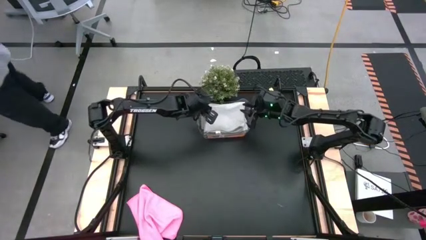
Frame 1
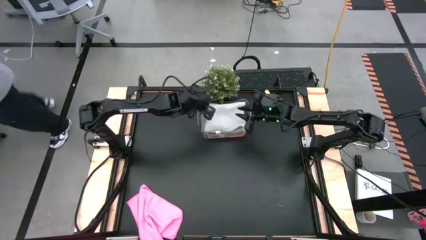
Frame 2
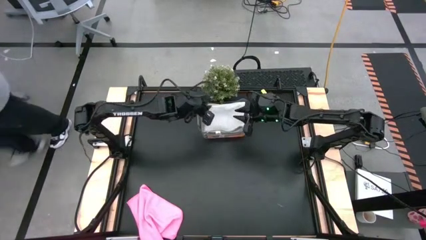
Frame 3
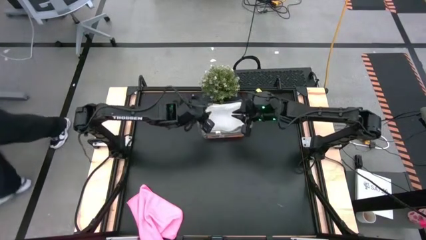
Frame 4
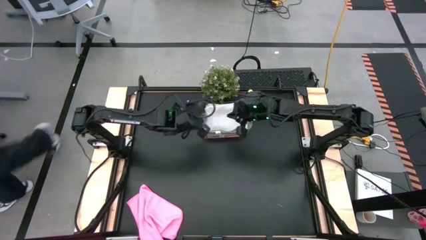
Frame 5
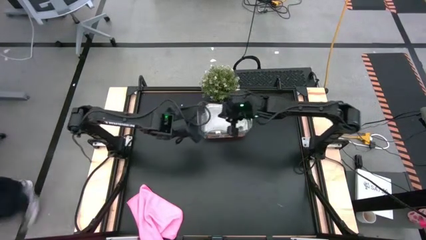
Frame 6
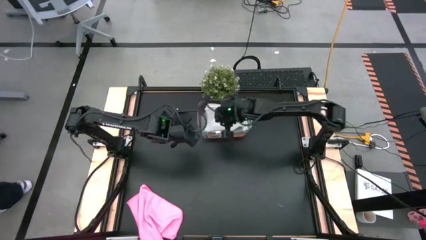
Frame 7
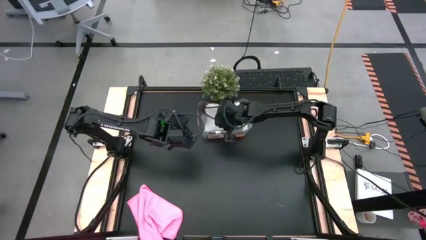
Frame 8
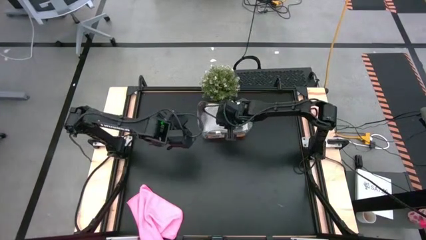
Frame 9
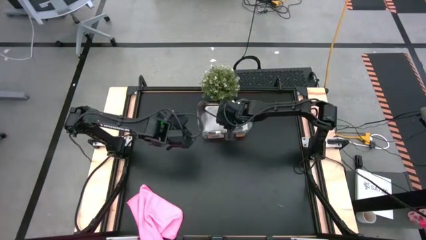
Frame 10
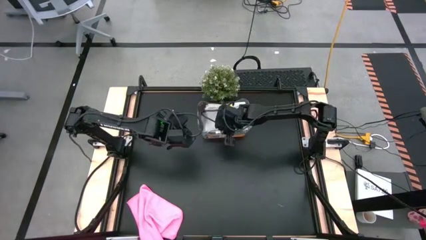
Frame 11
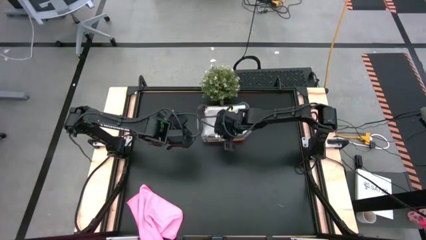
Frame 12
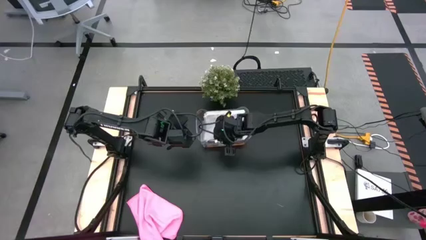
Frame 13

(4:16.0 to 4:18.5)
Task: Fold microfiber towels
Adjust the transparent bin

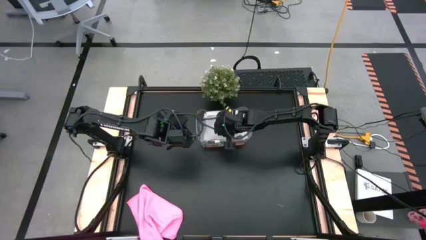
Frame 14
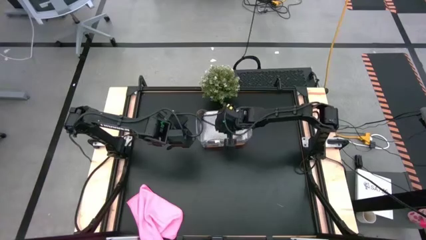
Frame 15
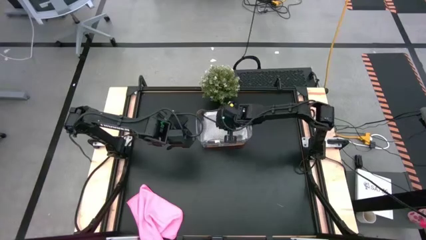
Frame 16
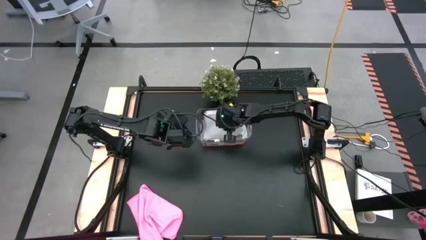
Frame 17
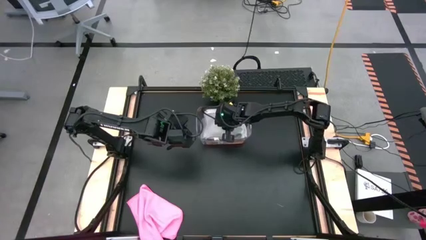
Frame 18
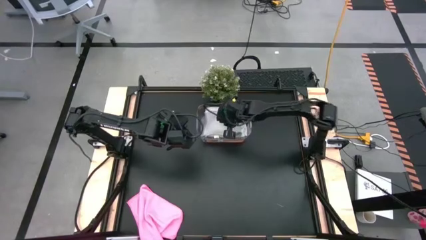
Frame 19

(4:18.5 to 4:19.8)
Adjust the gray microfiber towel in the transparent bin

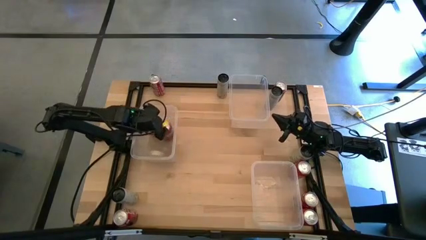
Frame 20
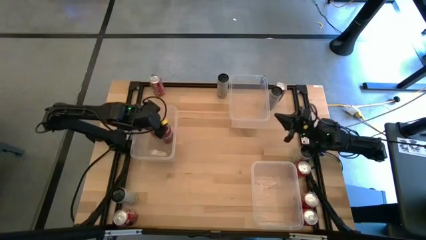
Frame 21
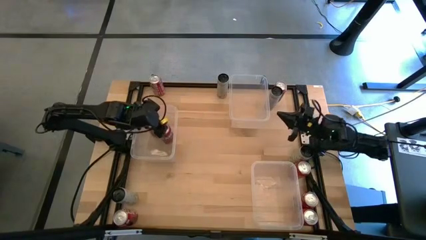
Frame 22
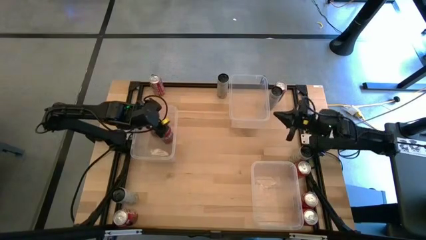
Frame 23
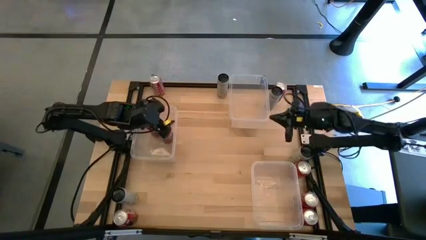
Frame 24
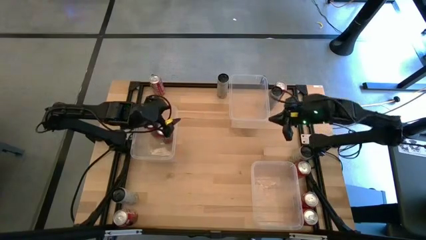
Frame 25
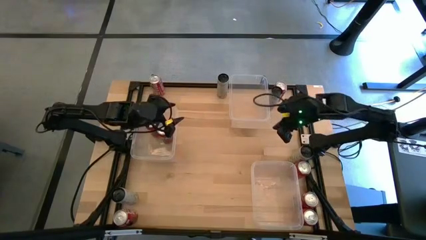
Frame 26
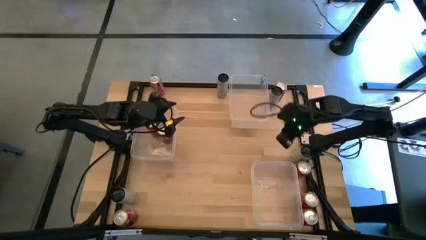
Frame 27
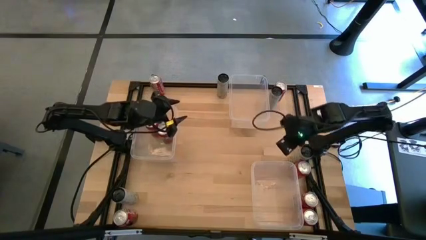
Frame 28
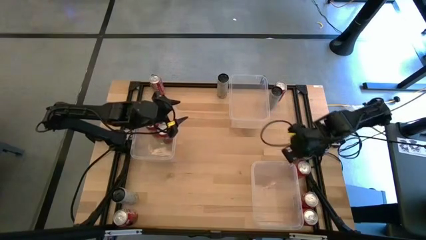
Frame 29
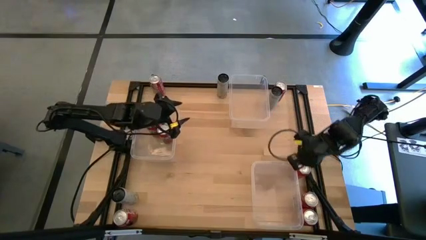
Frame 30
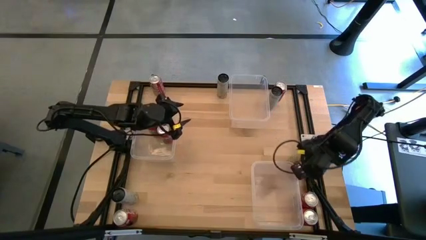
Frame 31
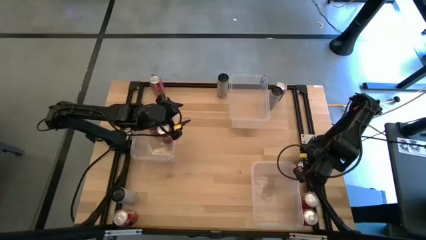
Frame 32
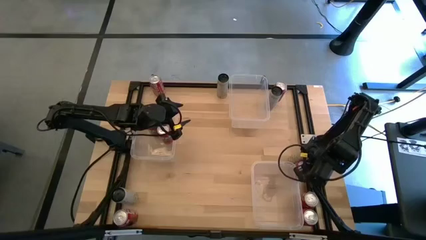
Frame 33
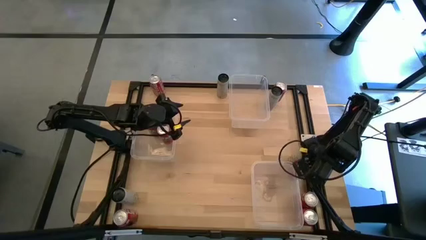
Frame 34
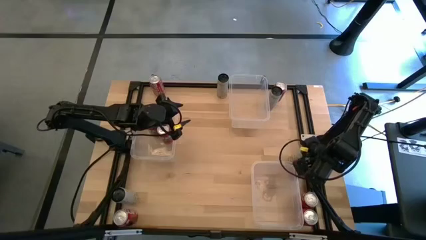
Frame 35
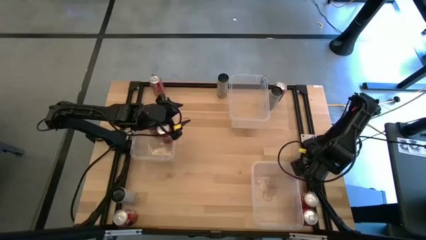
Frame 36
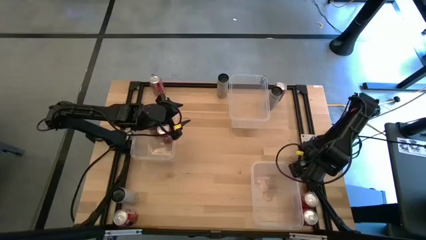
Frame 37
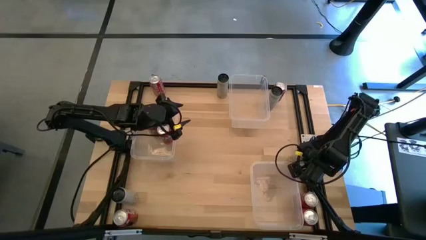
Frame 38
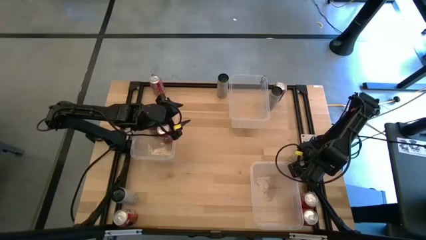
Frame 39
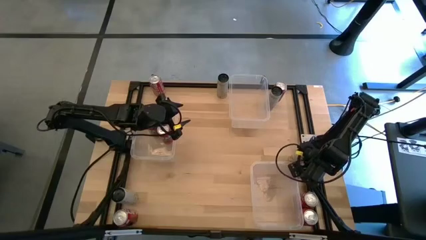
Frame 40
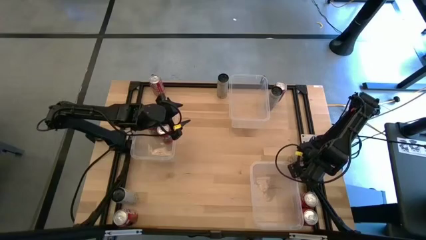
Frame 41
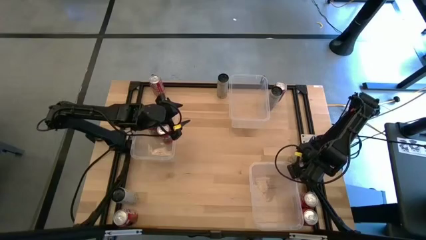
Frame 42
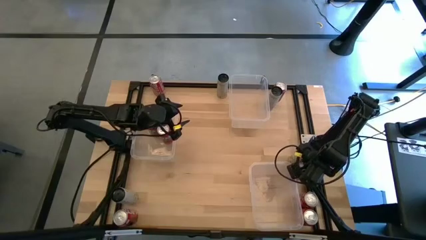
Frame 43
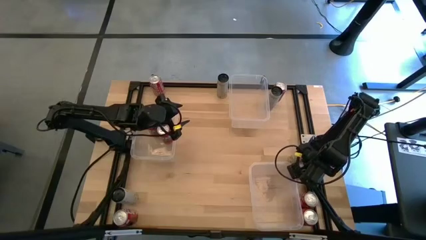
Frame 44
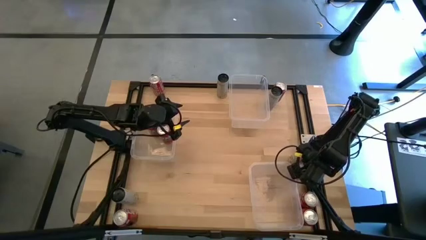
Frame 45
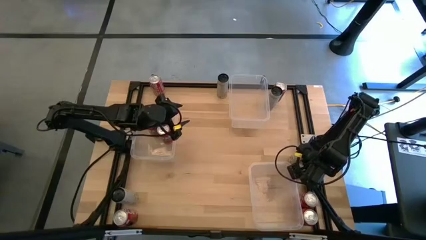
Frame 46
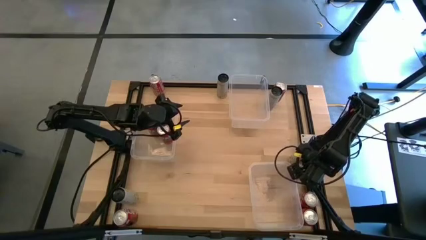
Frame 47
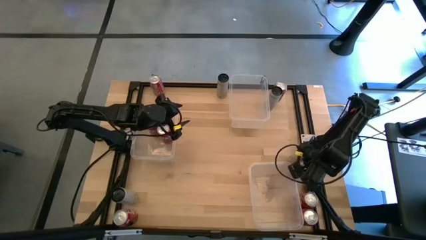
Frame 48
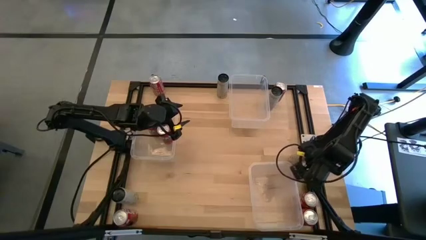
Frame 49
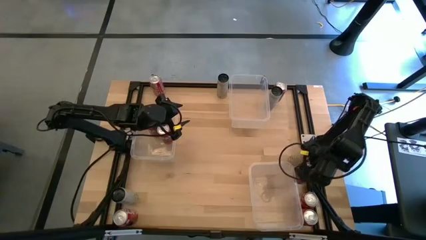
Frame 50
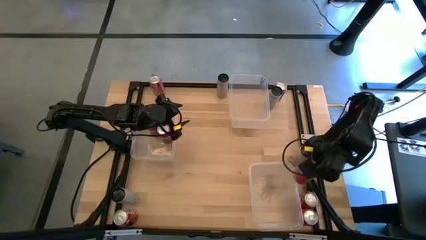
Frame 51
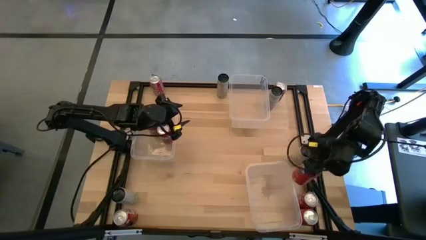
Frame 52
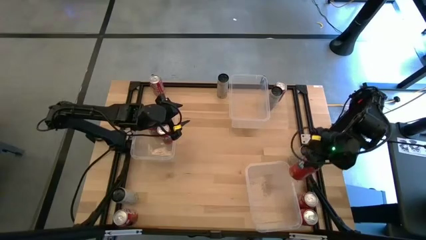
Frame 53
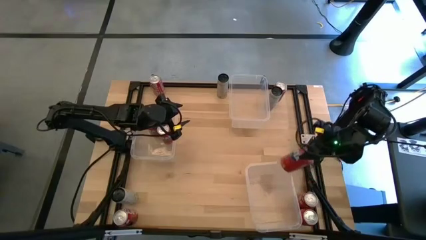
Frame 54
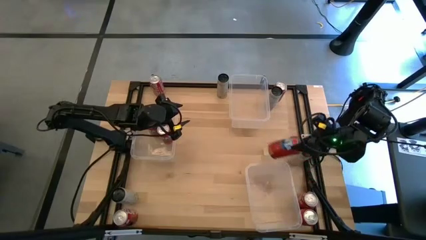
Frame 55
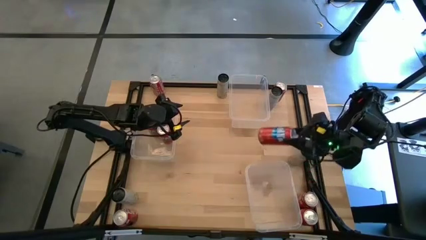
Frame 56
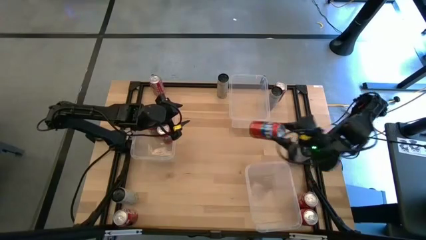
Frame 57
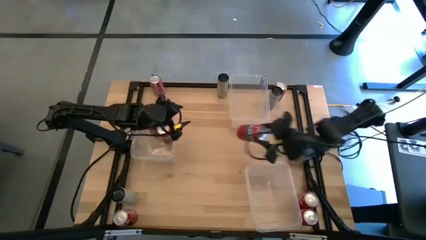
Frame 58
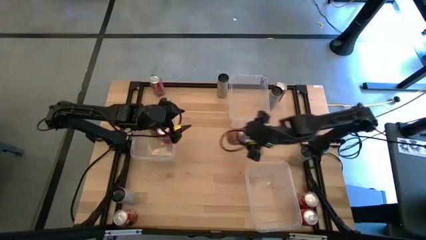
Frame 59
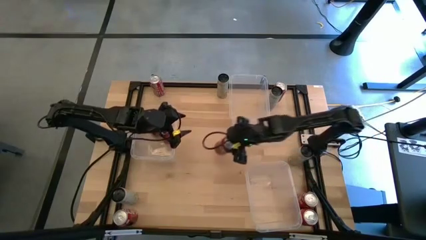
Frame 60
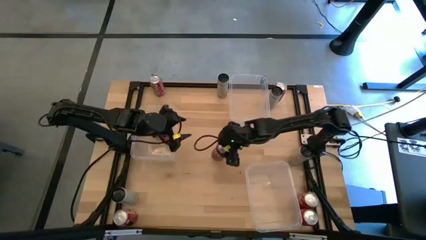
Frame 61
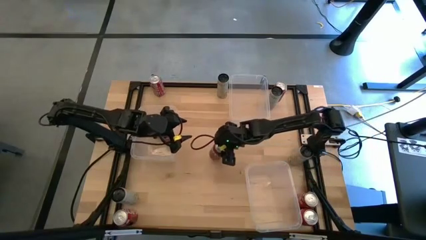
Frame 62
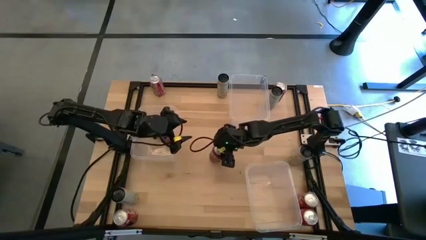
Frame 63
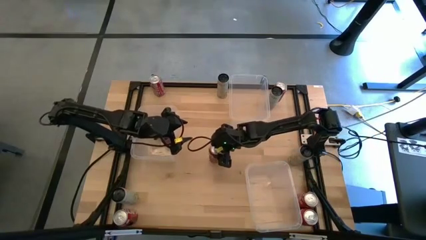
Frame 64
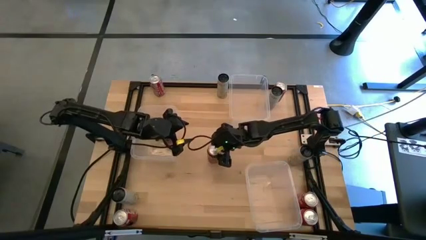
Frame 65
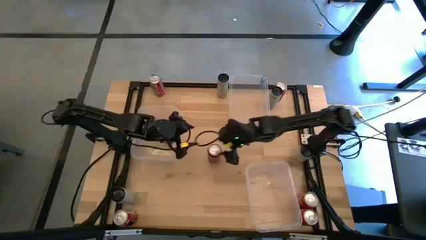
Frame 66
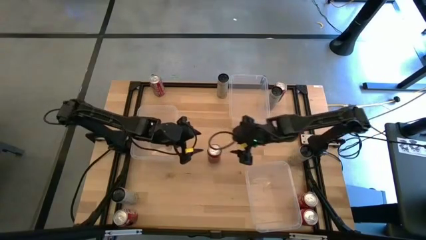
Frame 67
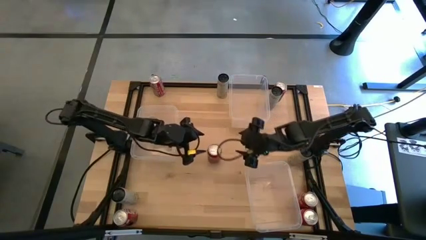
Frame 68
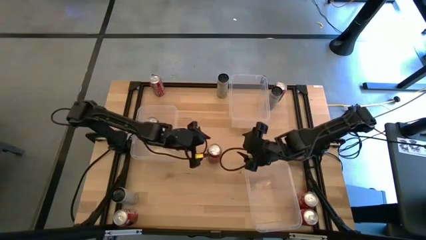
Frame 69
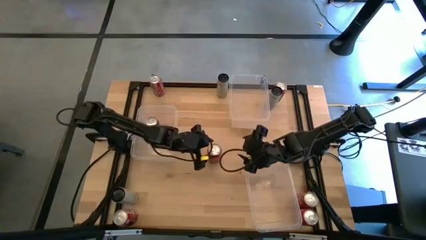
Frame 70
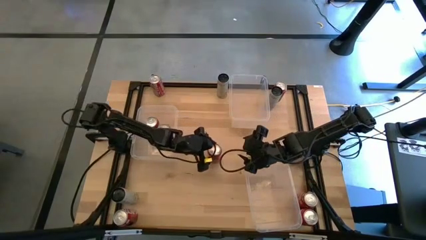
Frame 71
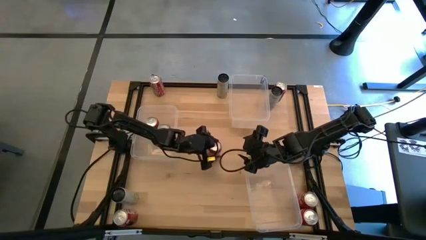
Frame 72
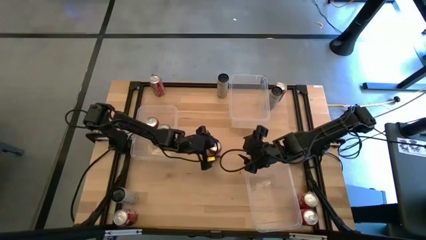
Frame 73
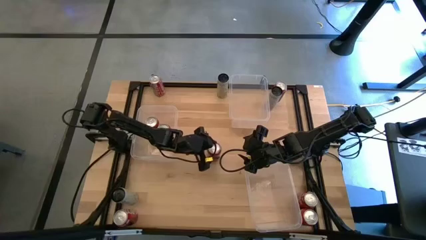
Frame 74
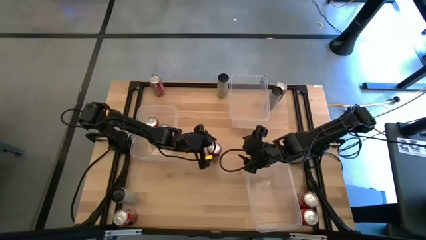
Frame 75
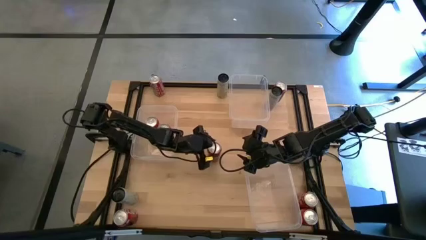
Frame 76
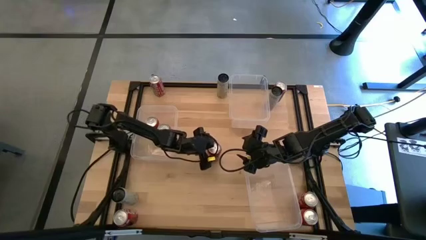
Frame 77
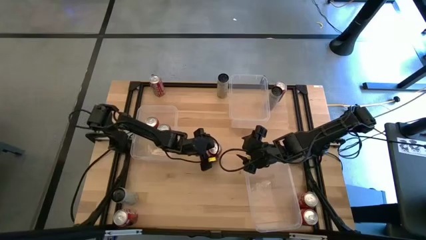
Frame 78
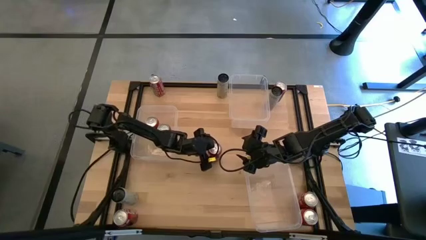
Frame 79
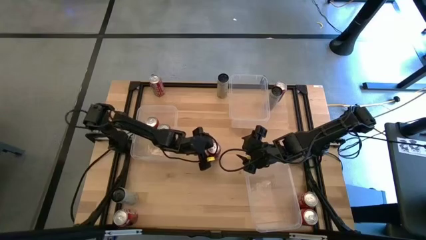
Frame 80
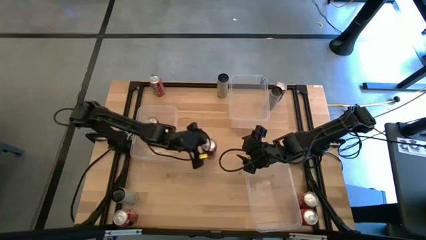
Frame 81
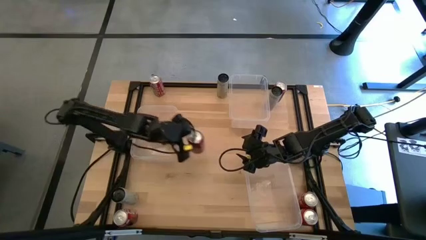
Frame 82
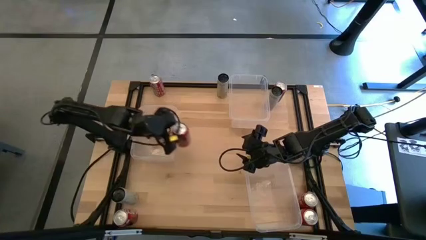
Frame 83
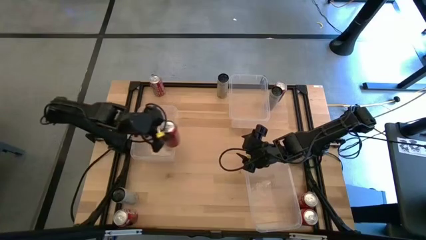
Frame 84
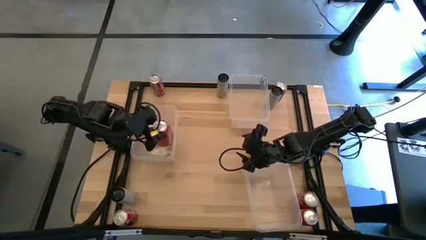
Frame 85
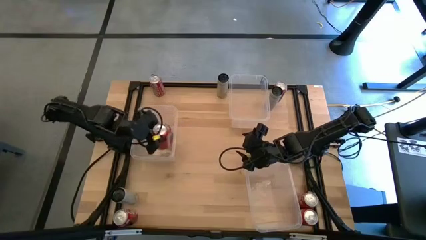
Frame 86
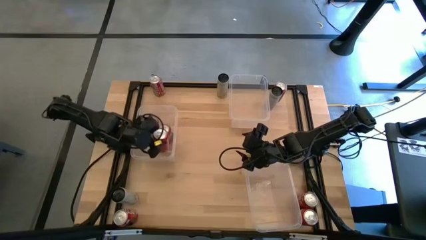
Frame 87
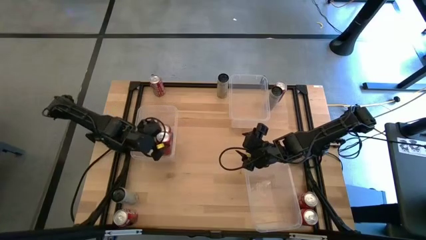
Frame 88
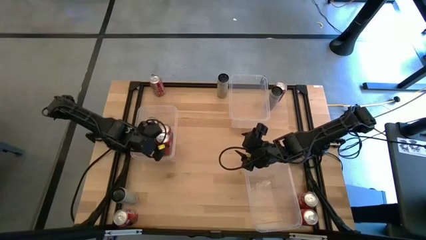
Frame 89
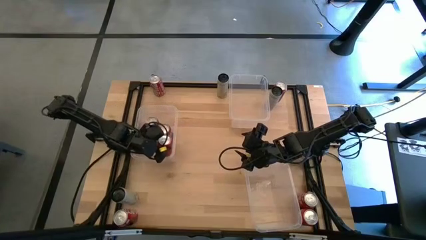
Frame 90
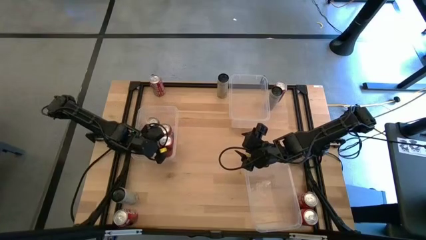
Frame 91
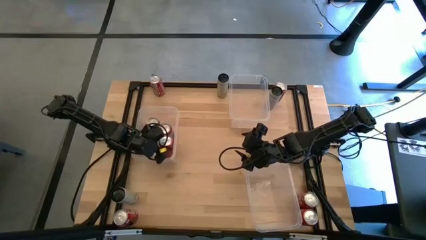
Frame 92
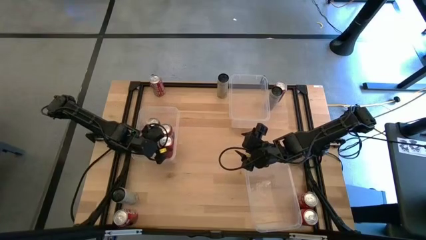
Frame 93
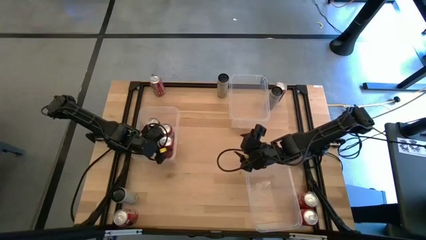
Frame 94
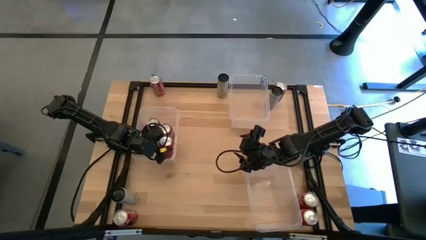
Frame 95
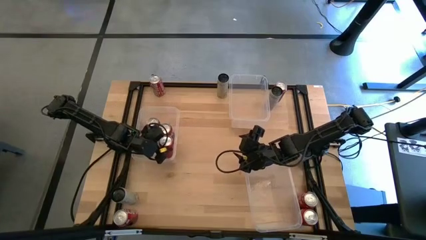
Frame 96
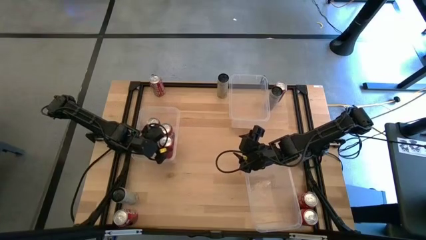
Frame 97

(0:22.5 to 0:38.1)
Task: Sort soda cans
Put the red soda can into the middle transparent bin
